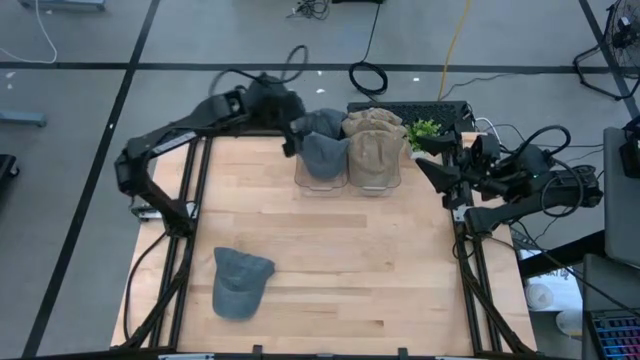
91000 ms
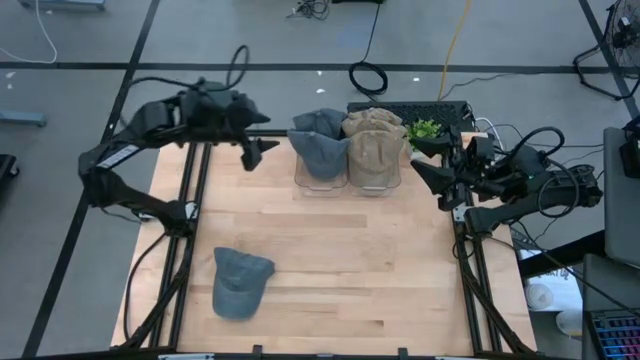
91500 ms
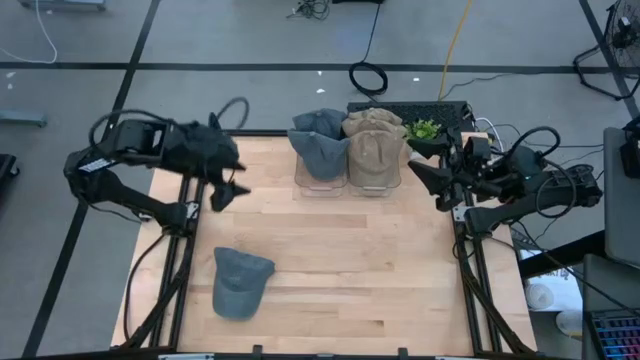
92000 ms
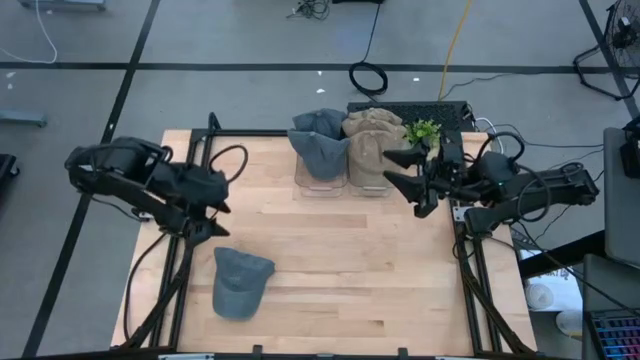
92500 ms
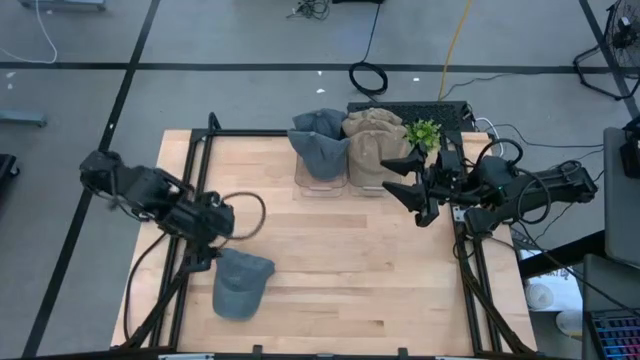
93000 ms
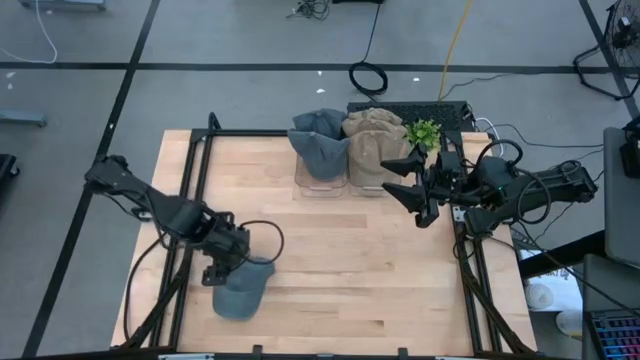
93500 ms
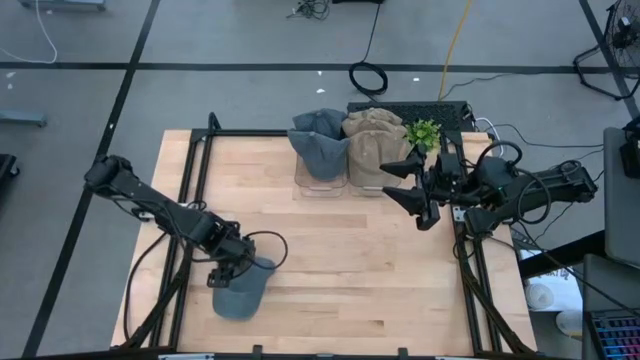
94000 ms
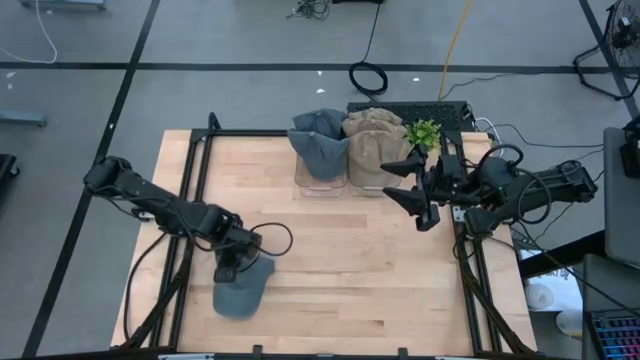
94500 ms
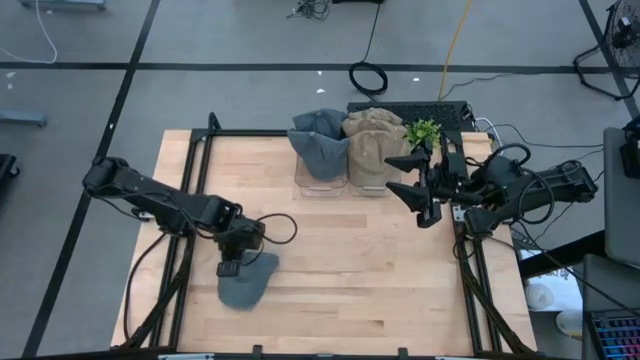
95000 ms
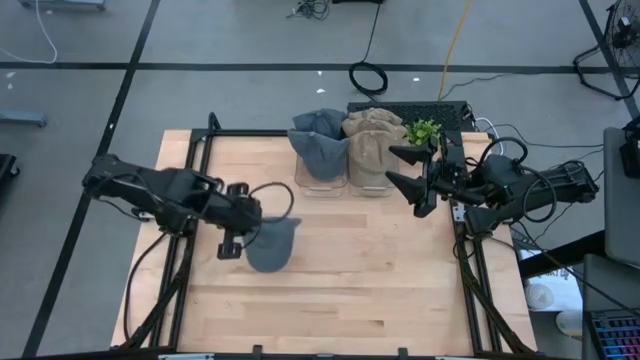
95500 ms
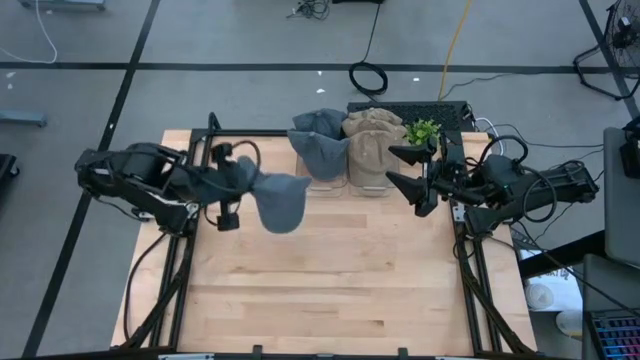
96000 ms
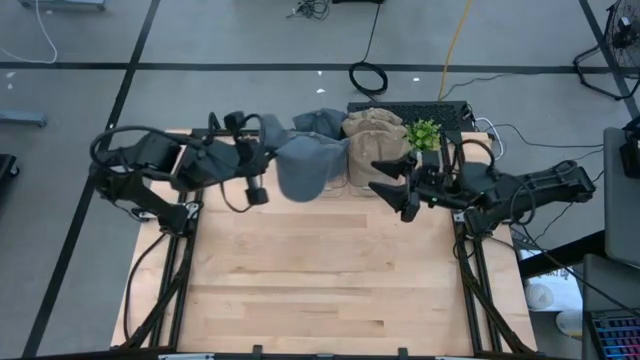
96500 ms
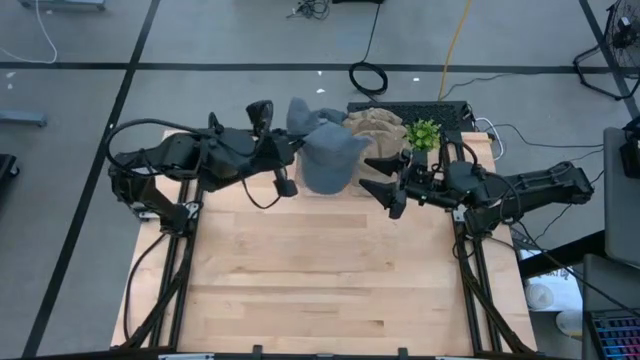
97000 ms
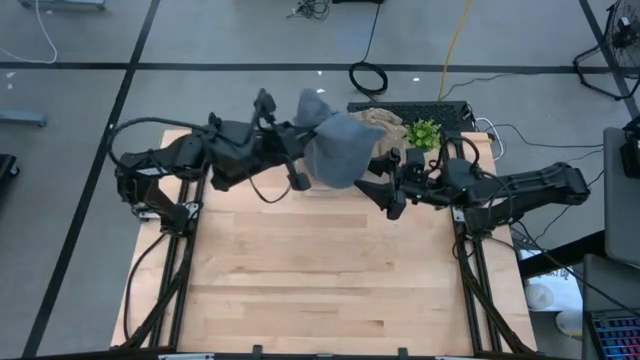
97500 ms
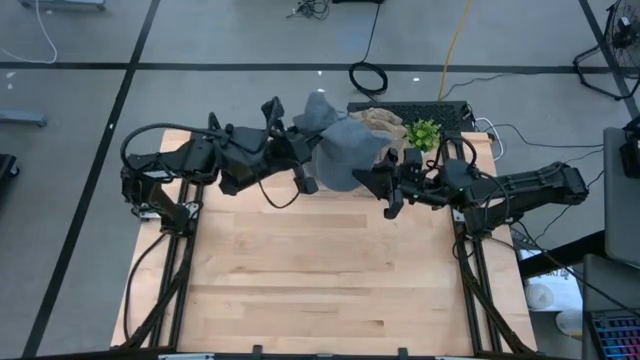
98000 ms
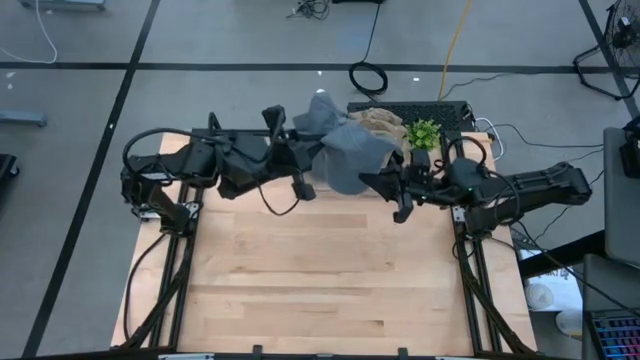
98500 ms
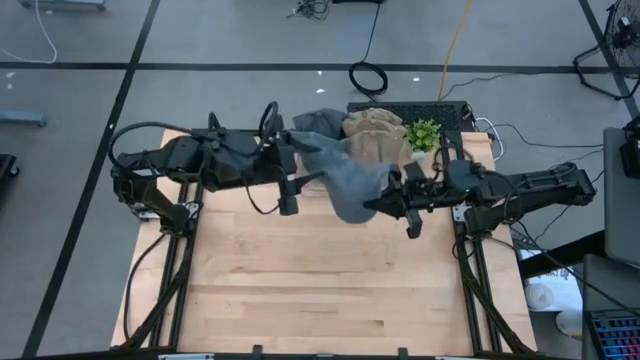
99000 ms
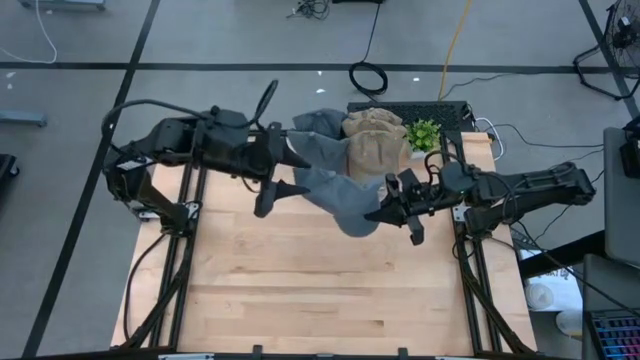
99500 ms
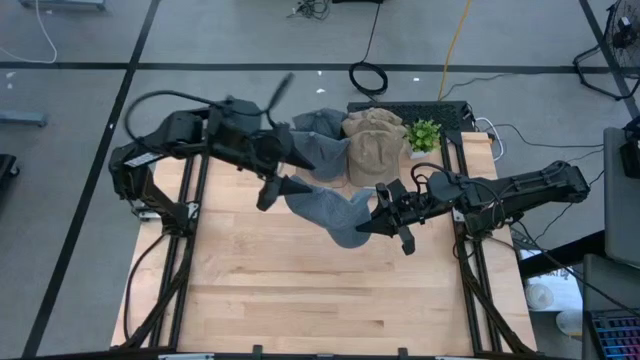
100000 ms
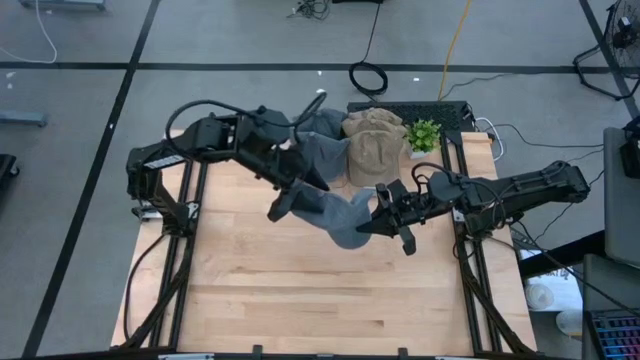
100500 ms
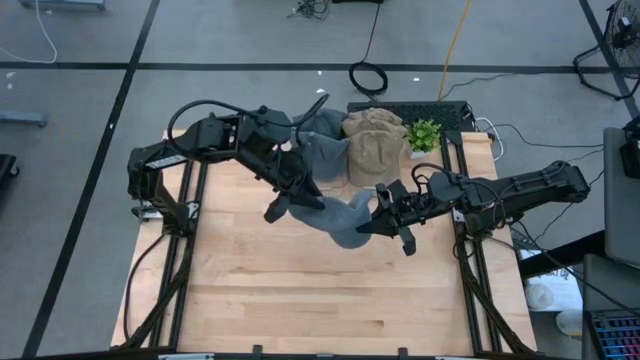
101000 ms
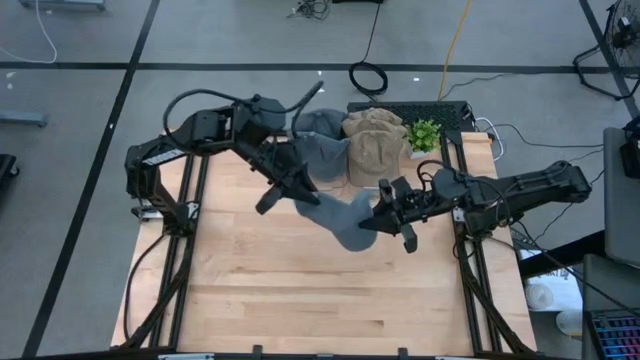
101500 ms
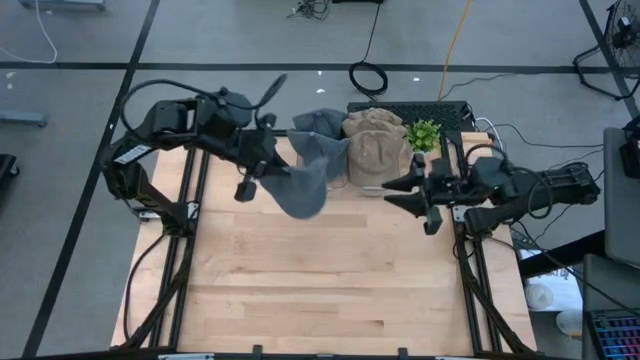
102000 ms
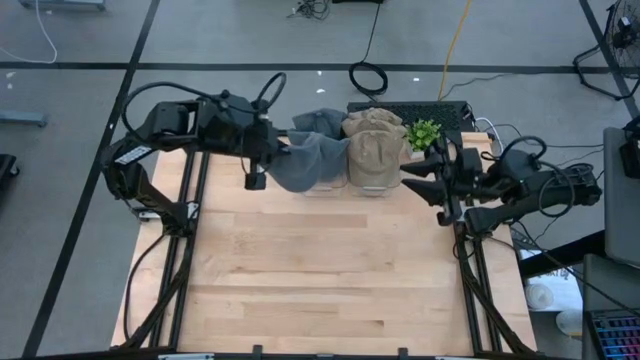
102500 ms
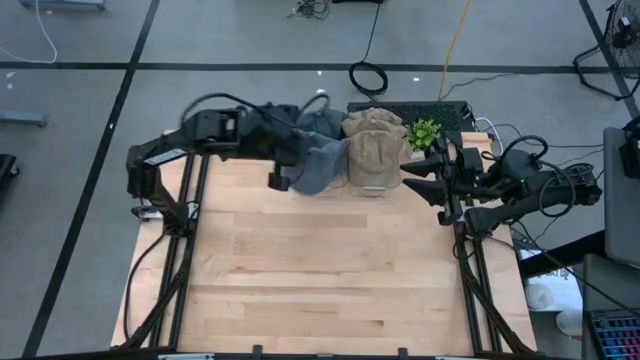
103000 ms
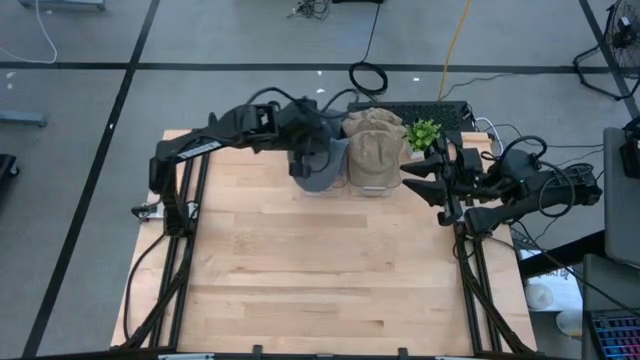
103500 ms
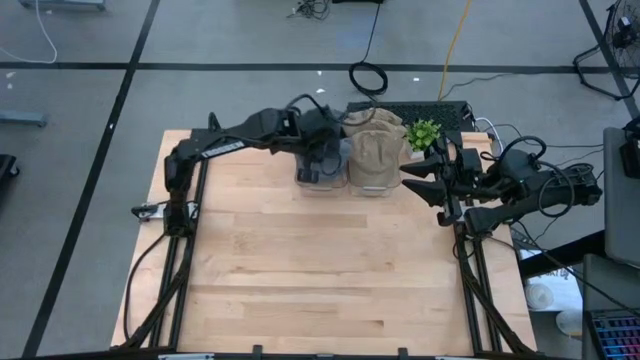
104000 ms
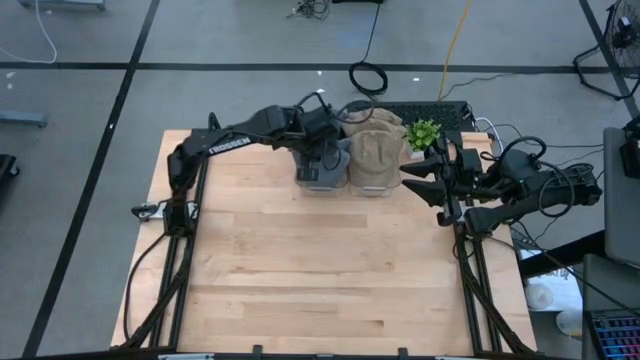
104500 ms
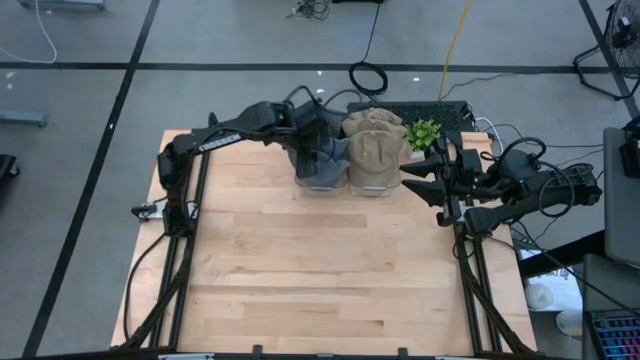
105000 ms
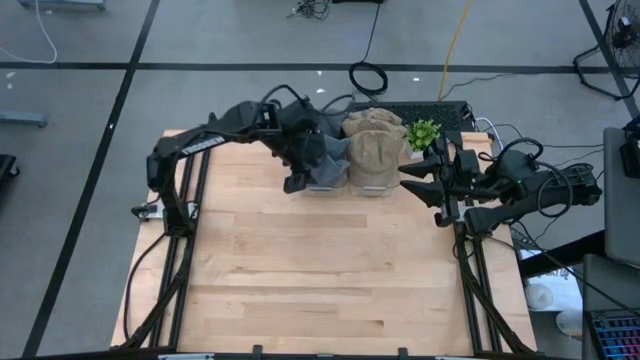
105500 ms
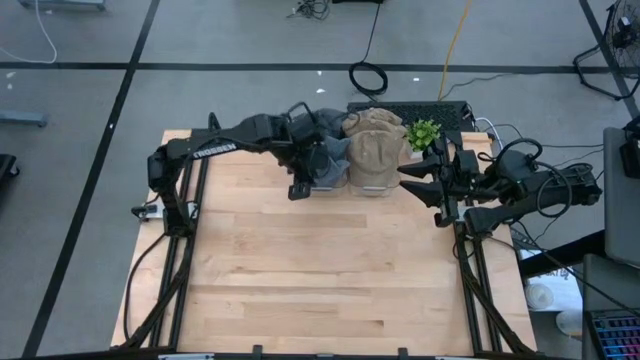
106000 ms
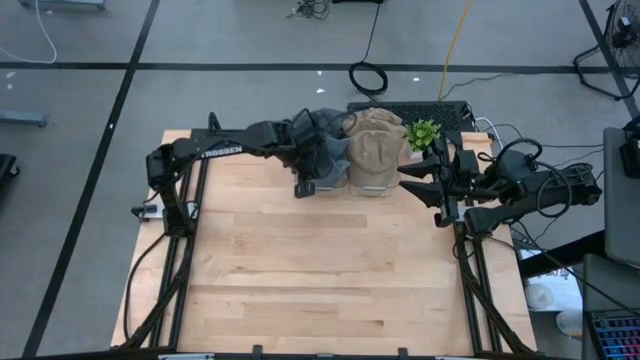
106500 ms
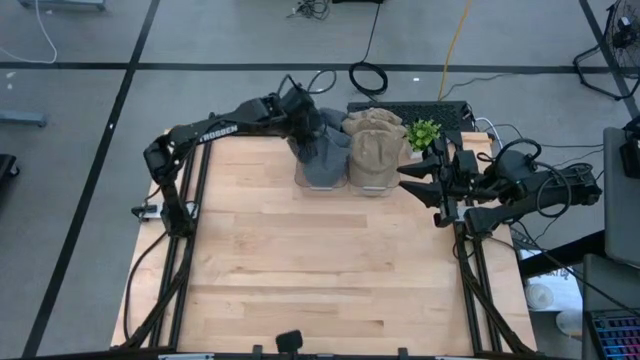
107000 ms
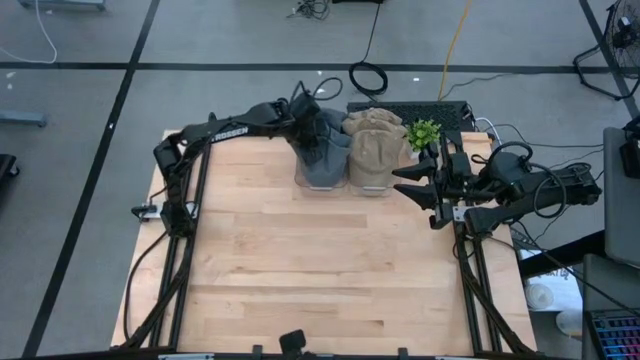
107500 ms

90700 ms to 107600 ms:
Task: Pick & Place hat
Put the blue cap into the left transparent bin

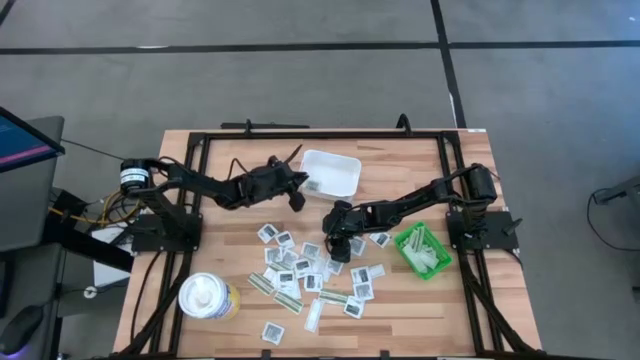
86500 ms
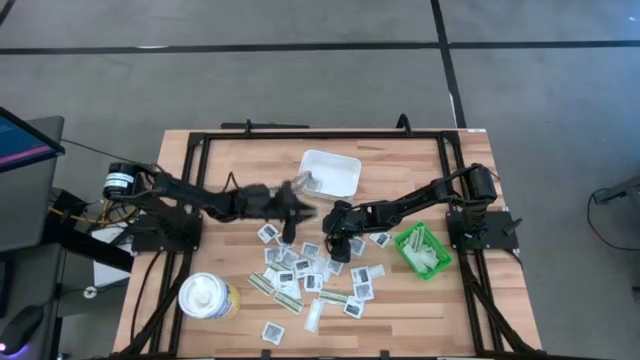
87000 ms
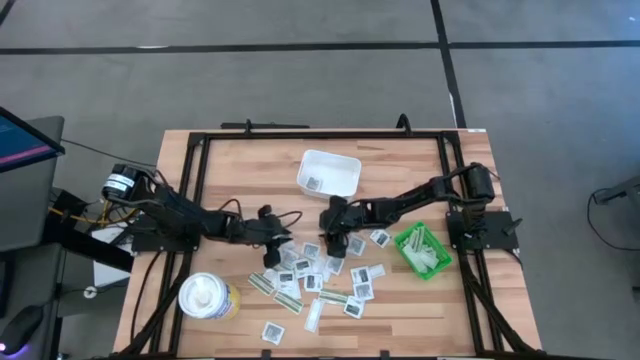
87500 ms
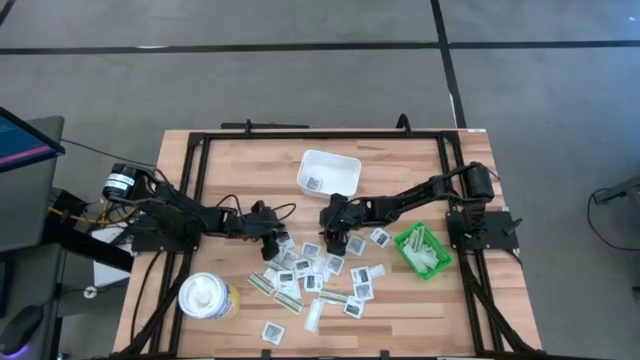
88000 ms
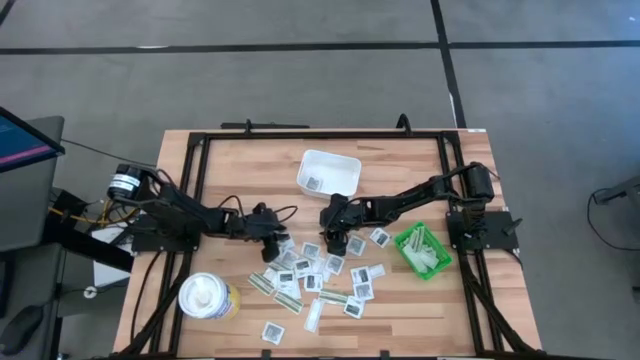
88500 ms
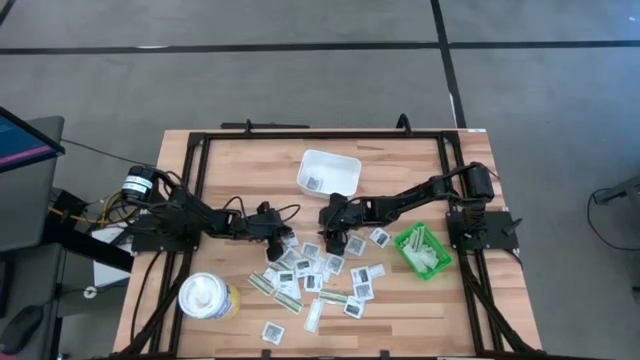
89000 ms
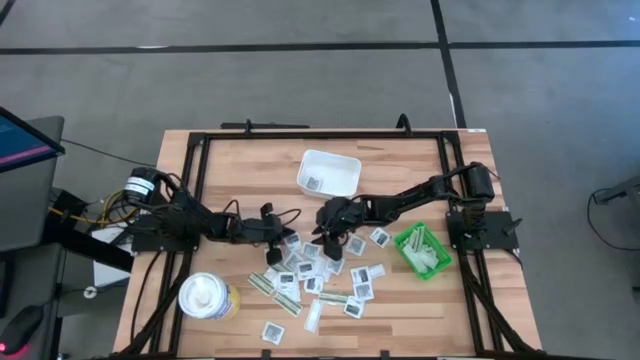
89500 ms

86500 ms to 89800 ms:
Task: Pick & Place First Aid Supplies
Put the towelette pack into the white bin

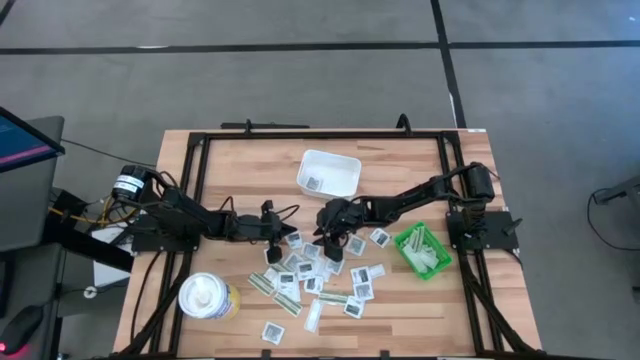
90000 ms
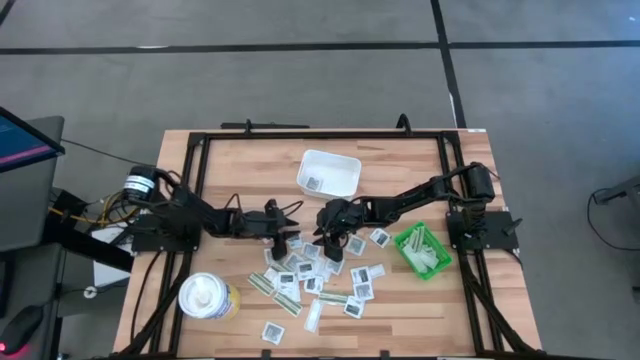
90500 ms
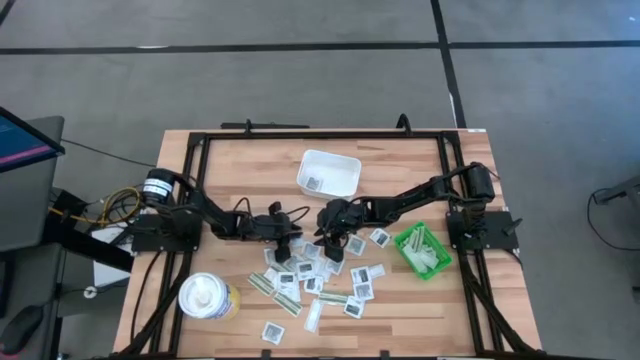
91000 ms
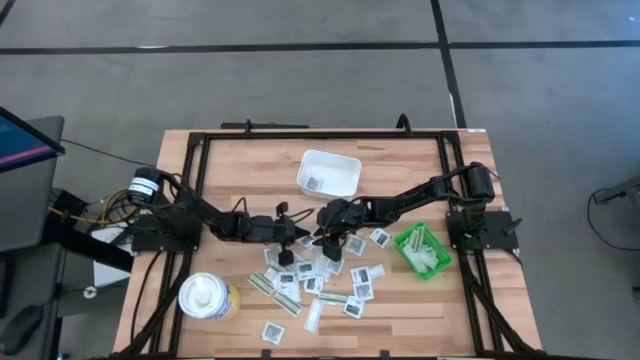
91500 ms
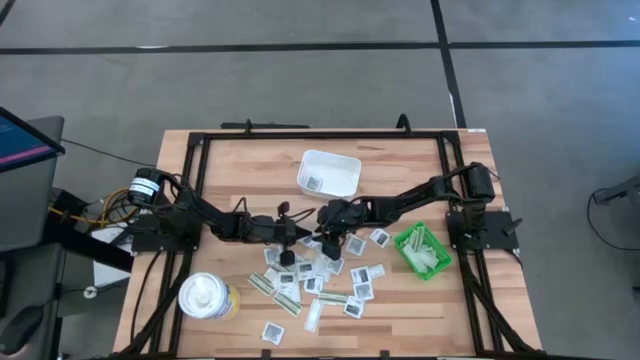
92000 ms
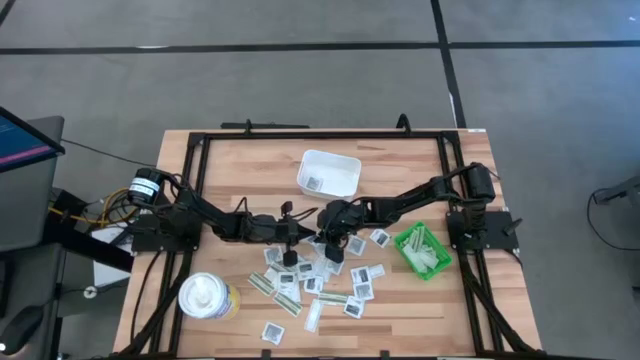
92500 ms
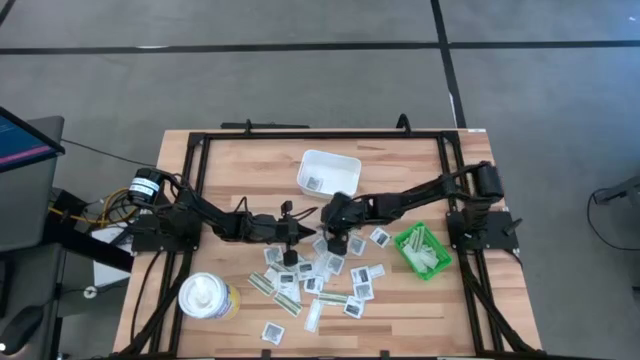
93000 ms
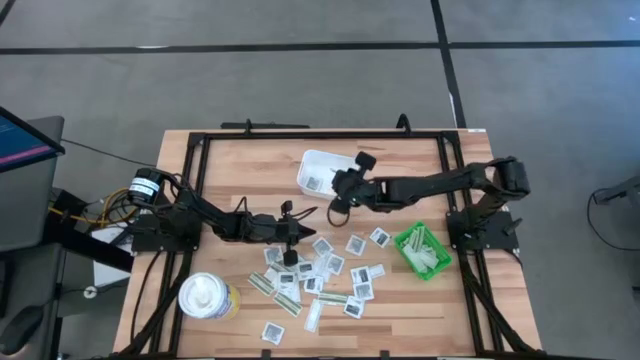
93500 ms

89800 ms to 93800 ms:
Put the towelette pack into the white bin
